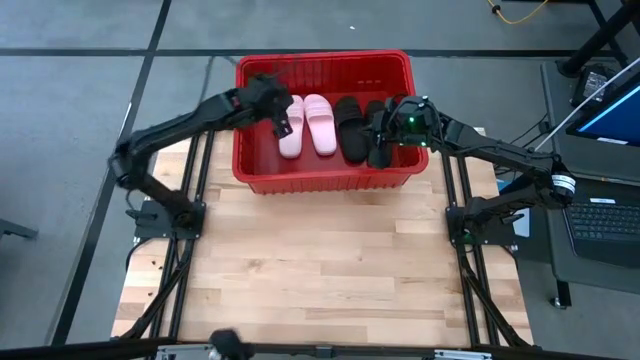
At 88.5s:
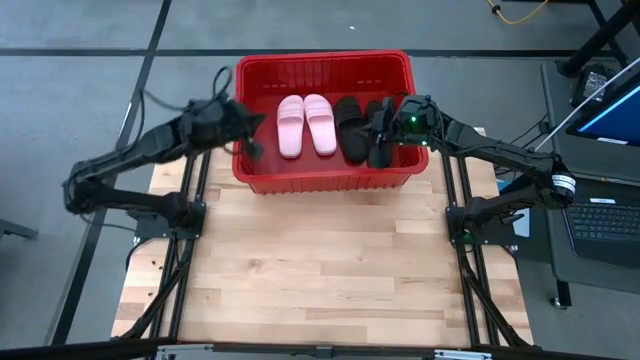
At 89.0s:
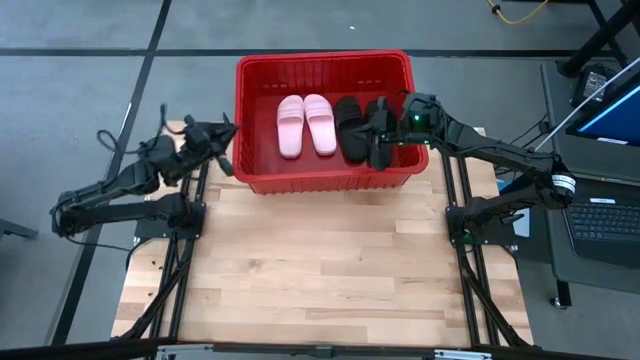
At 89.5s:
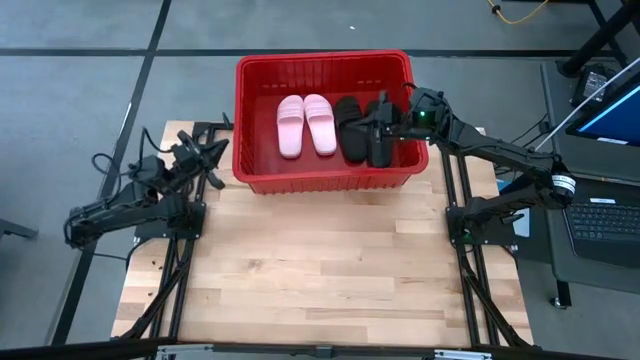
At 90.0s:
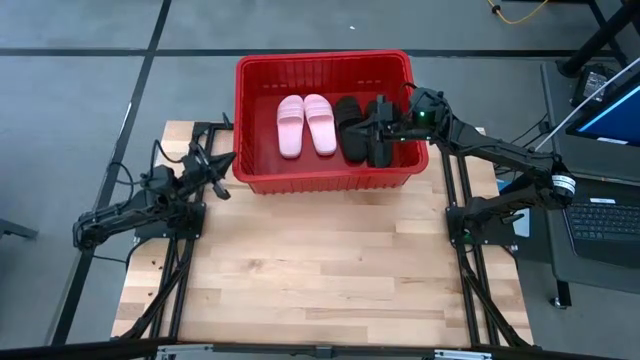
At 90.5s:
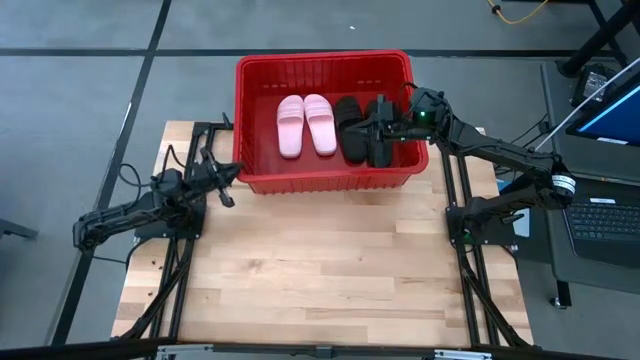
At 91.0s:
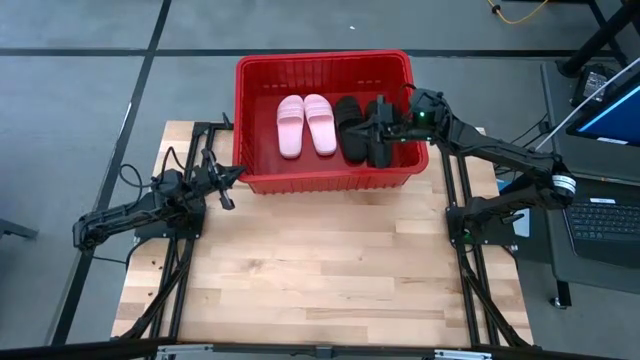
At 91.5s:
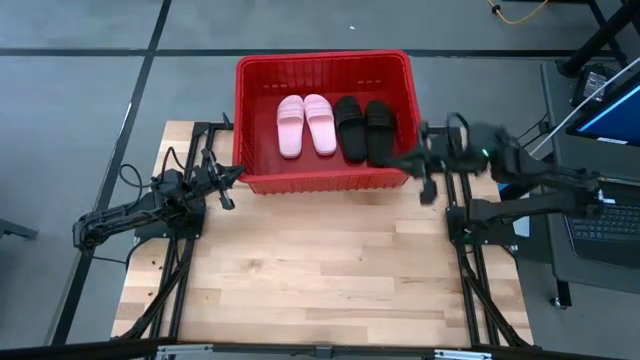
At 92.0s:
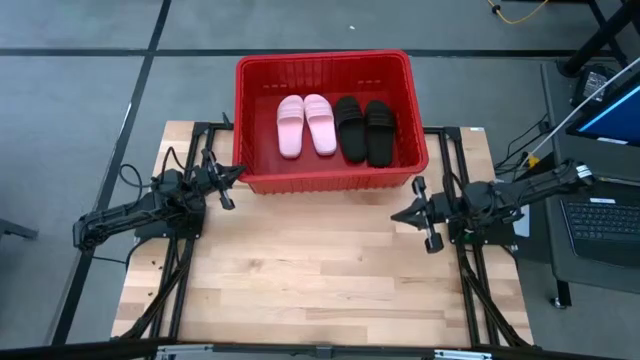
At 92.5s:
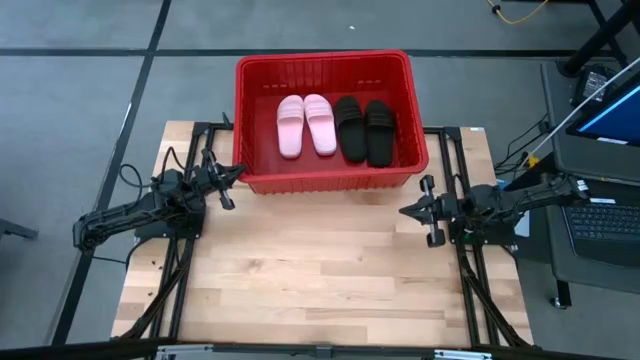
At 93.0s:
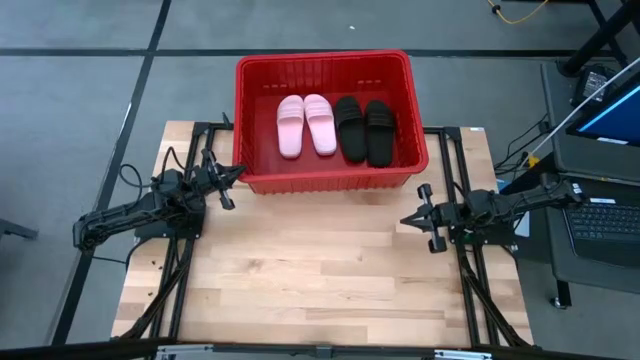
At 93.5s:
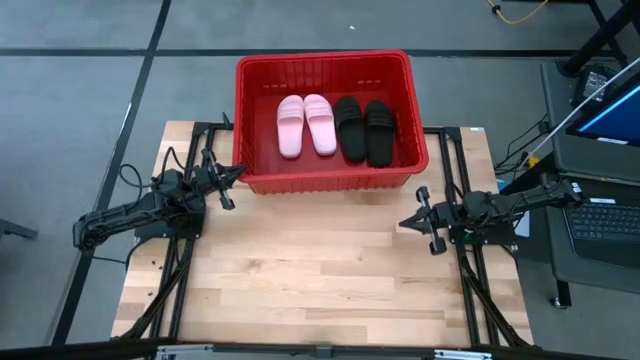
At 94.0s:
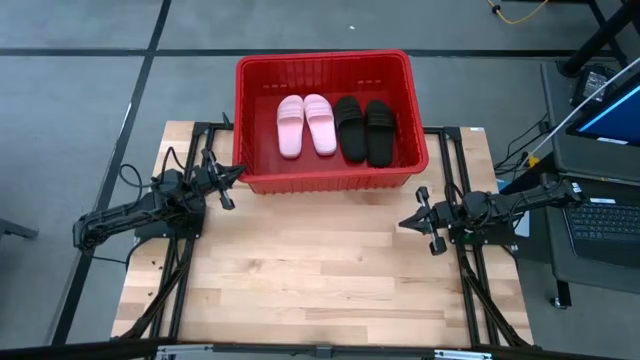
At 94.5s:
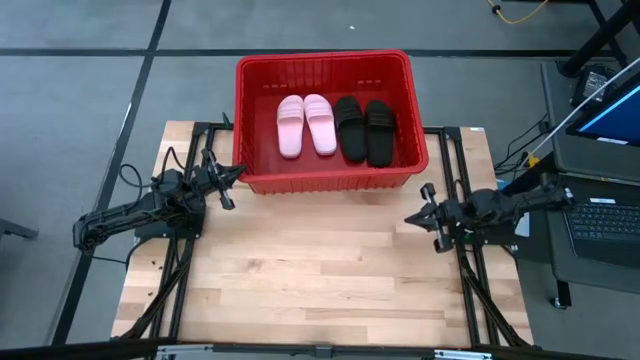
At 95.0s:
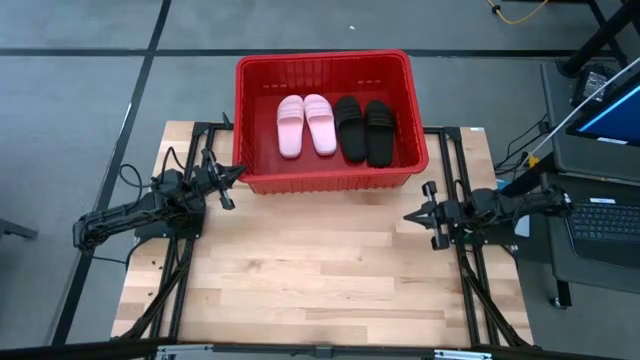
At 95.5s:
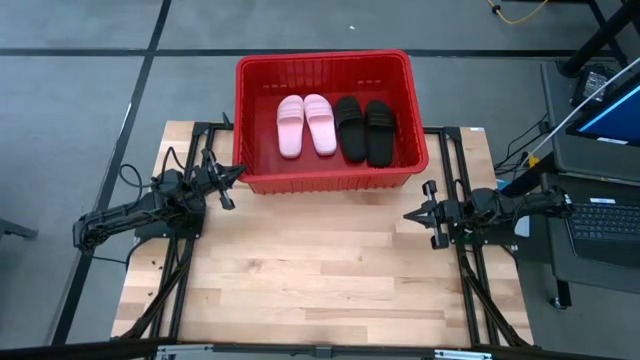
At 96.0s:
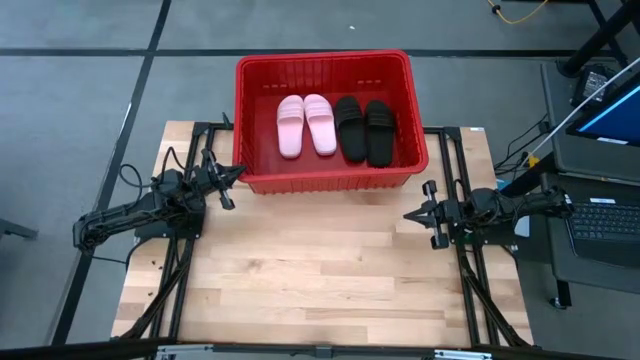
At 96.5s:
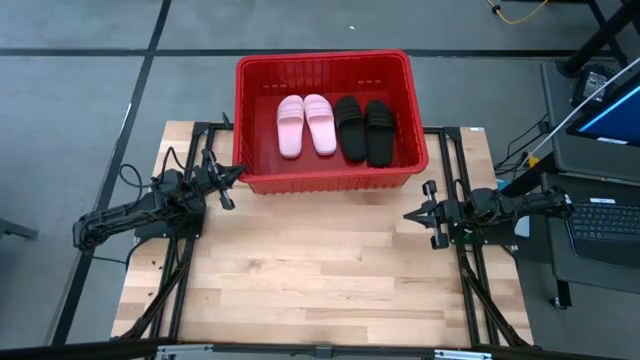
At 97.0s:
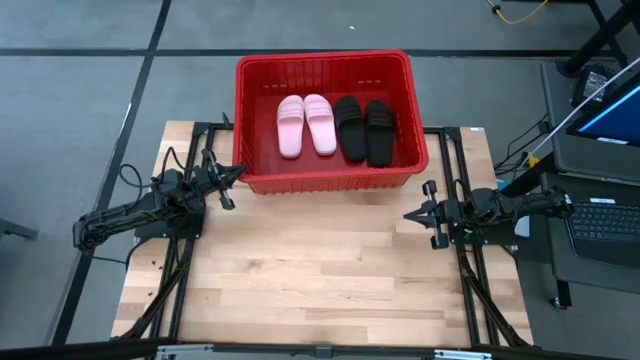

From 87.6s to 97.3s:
Task: Pick and place slides into bin
Return to Home Position

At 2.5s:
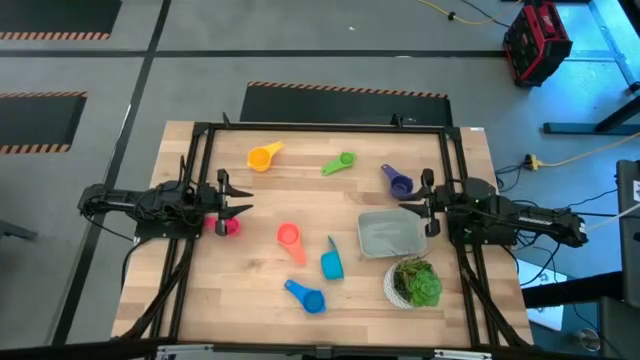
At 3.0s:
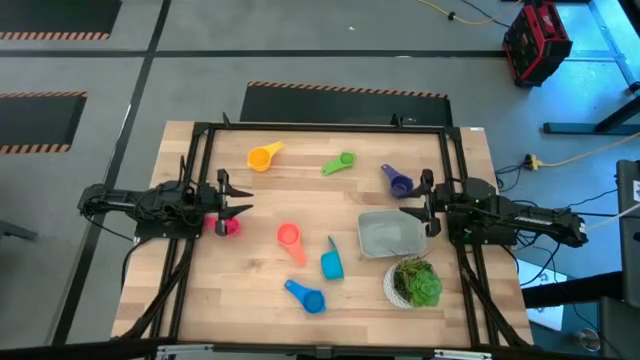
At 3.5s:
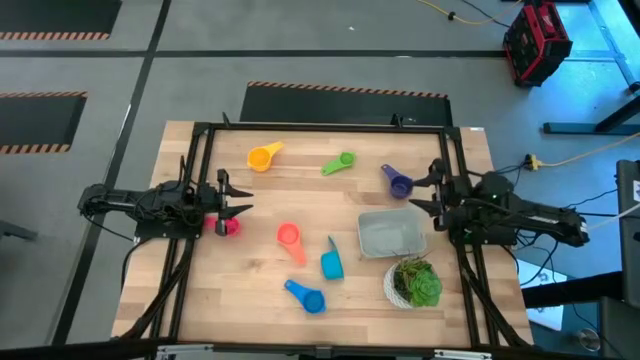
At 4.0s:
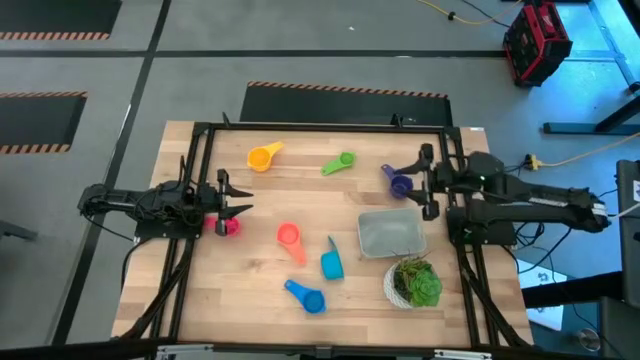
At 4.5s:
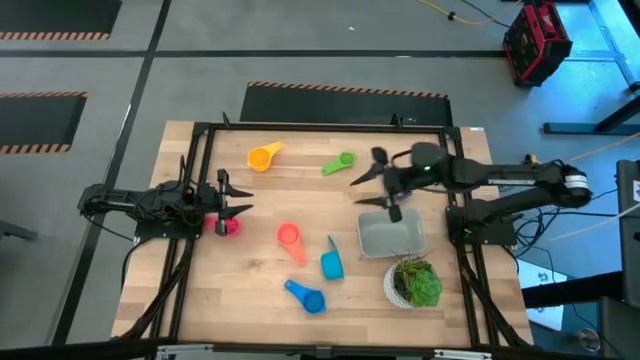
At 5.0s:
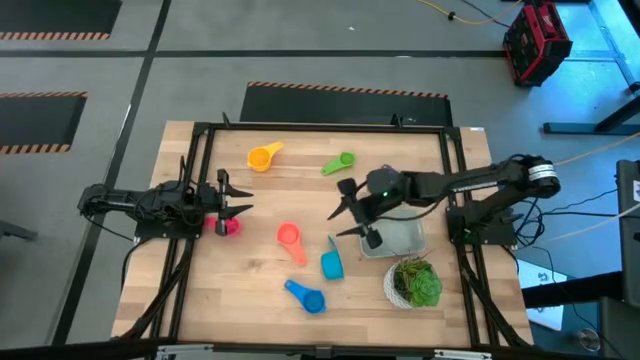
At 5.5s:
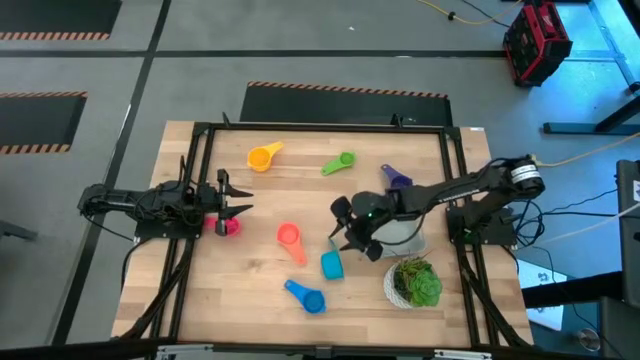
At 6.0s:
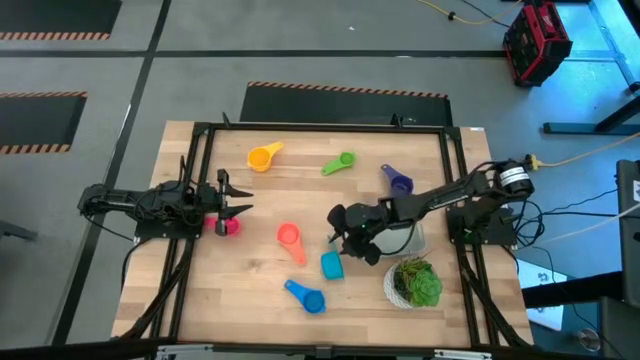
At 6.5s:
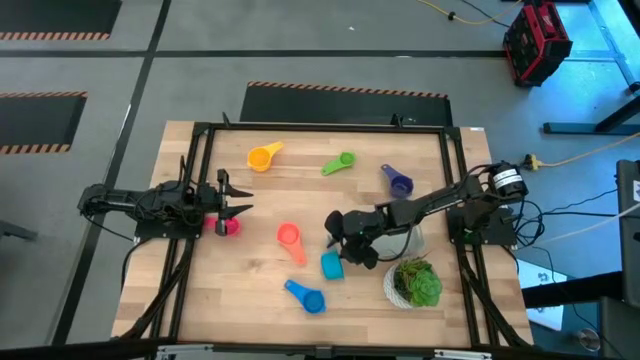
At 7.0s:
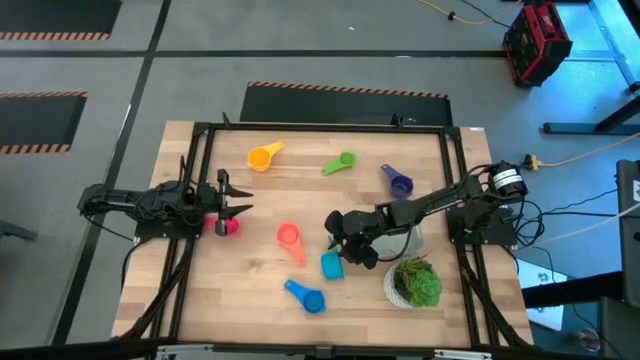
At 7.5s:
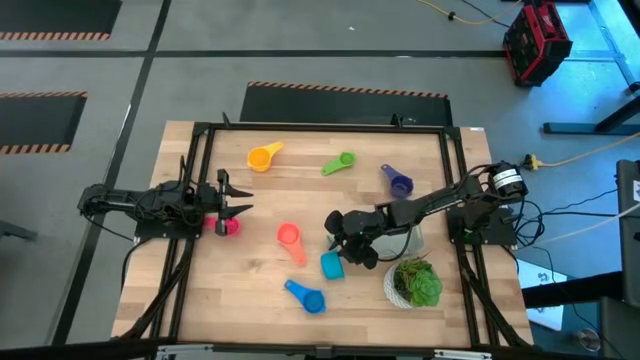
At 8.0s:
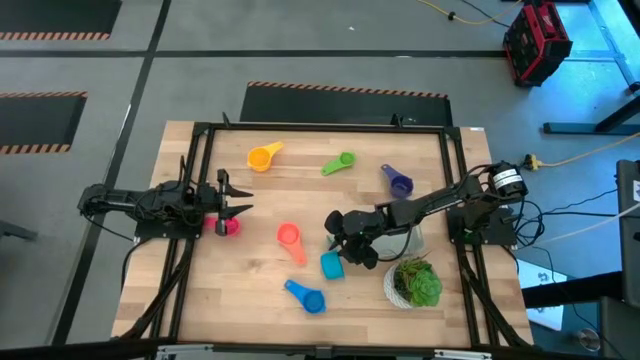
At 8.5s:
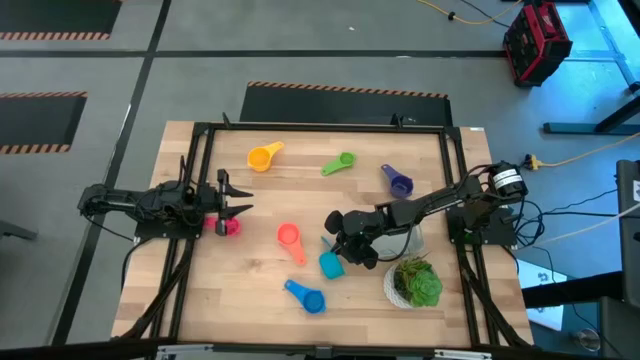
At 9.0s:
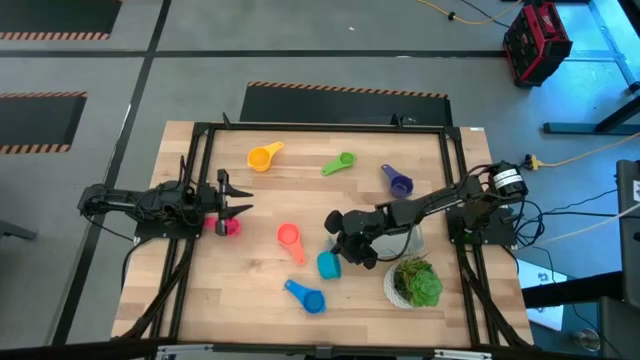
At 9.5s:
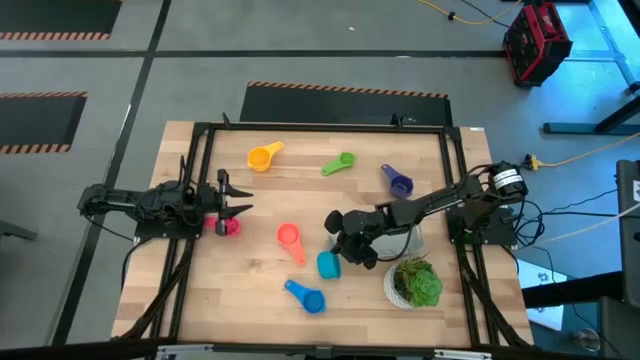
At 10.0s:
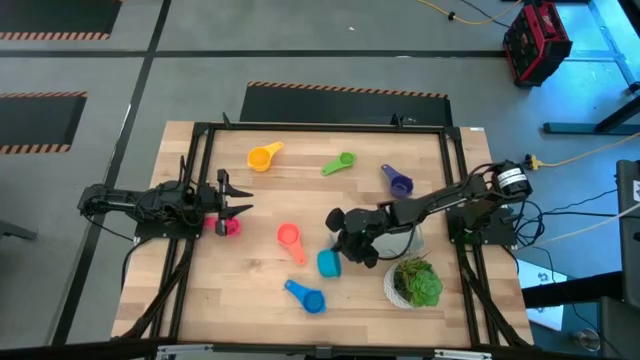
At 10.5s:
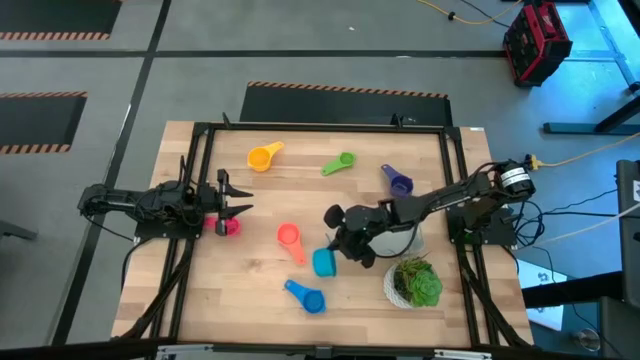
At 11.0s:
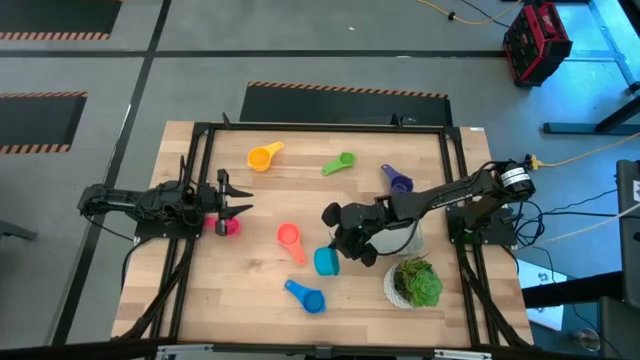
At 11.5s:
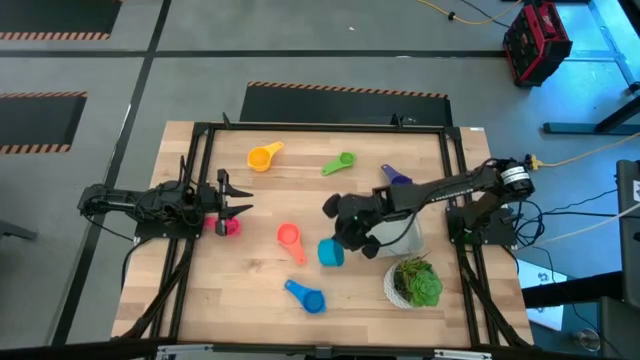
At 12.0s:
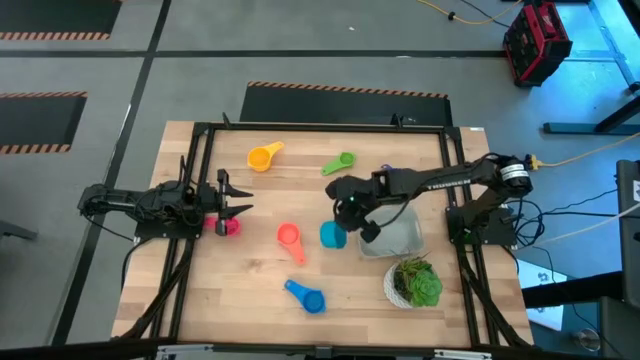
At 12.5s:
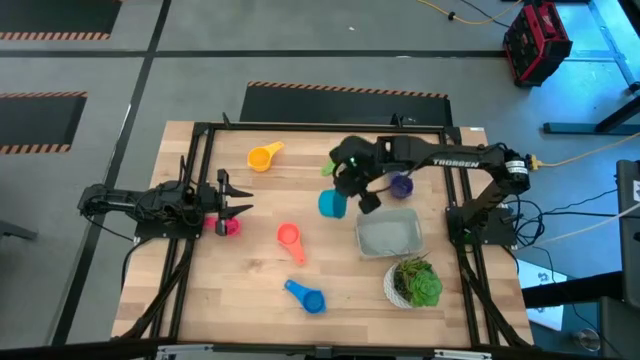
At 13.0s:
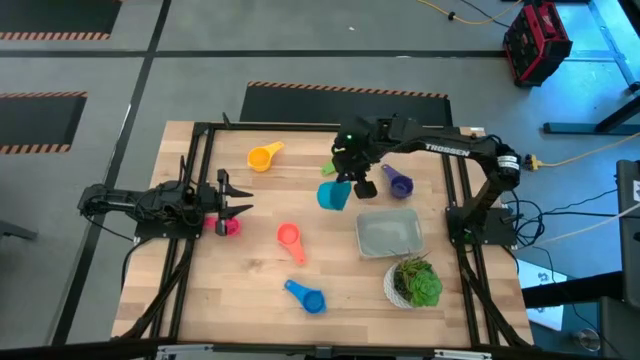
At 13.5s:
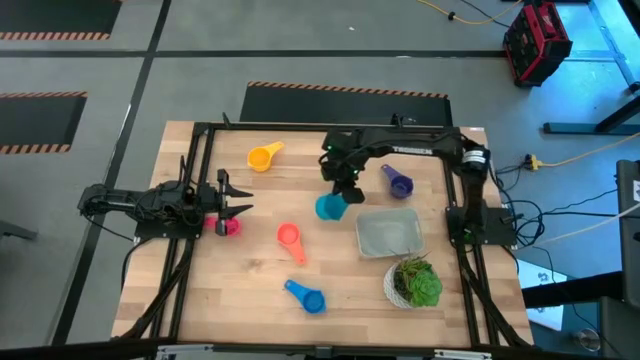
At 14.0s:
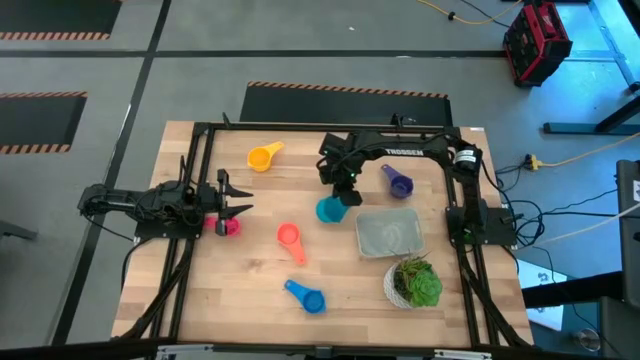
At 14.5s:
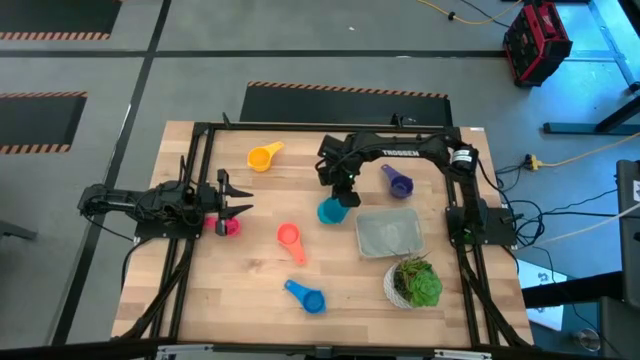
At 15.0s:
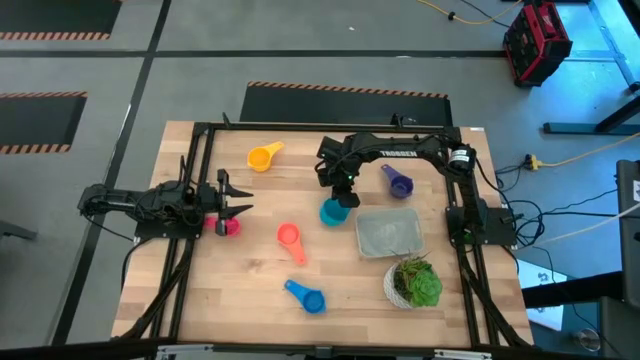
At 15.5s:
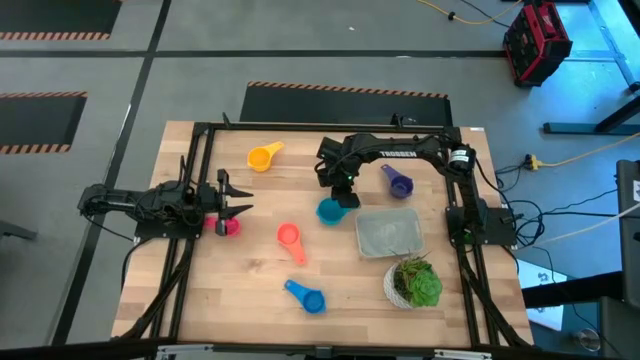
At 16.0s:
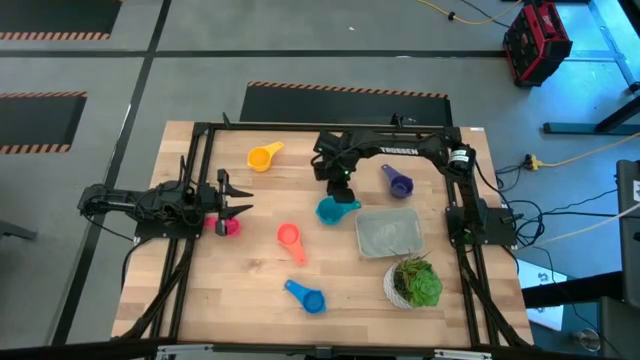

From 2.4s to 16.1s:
Task: Nest measuring cups in basket
Move the light blue measuring cup to the top center of the table
